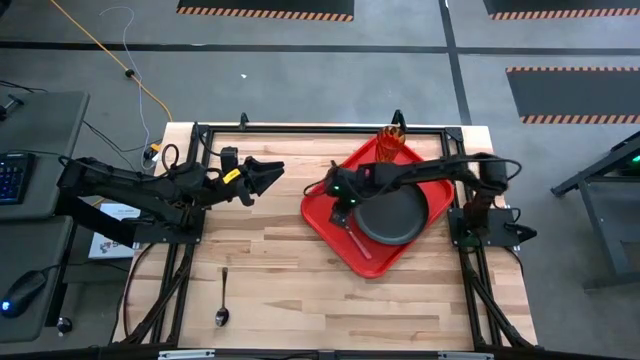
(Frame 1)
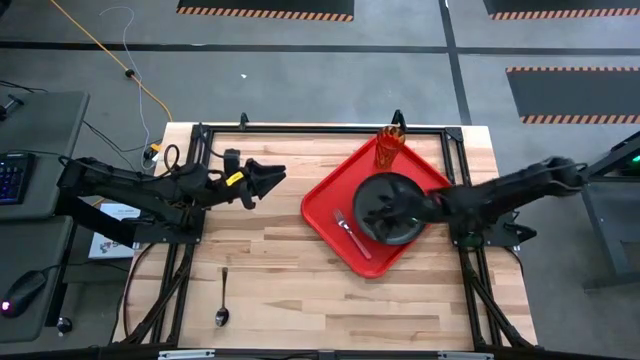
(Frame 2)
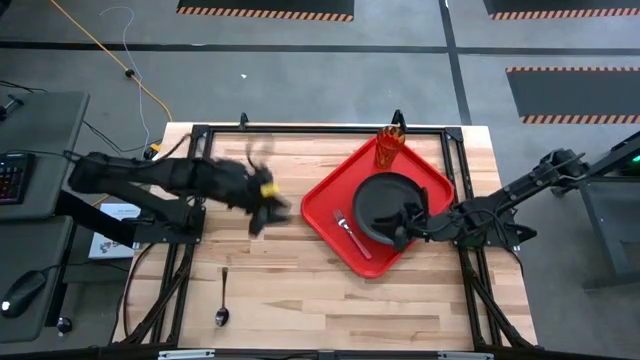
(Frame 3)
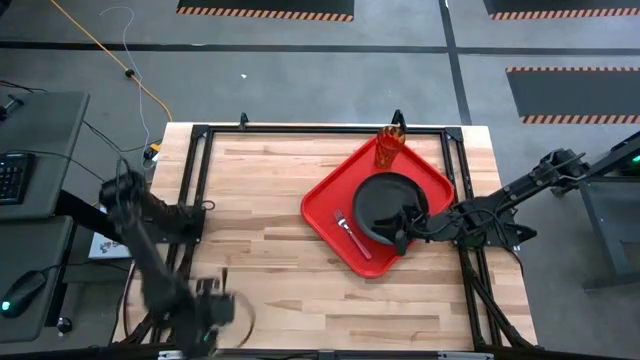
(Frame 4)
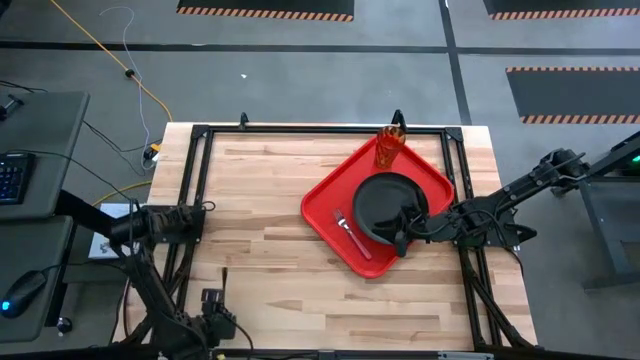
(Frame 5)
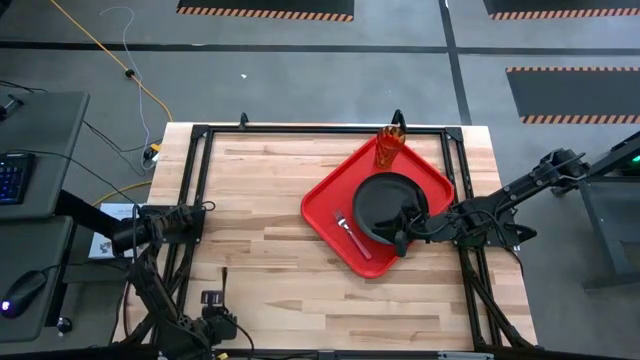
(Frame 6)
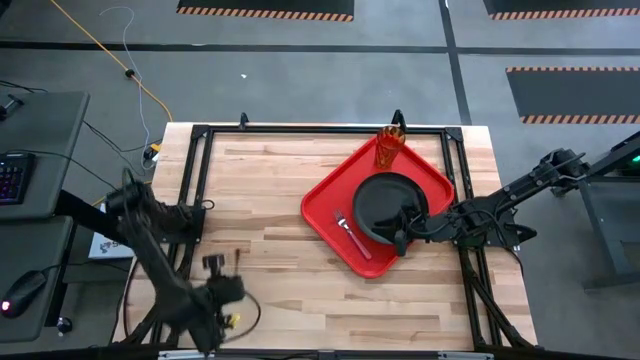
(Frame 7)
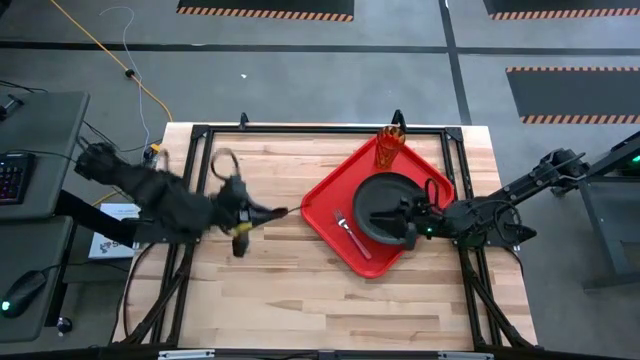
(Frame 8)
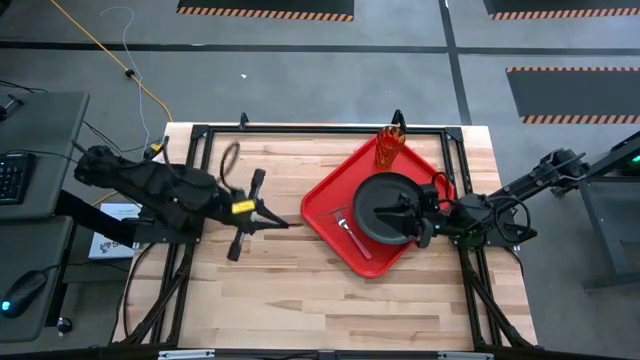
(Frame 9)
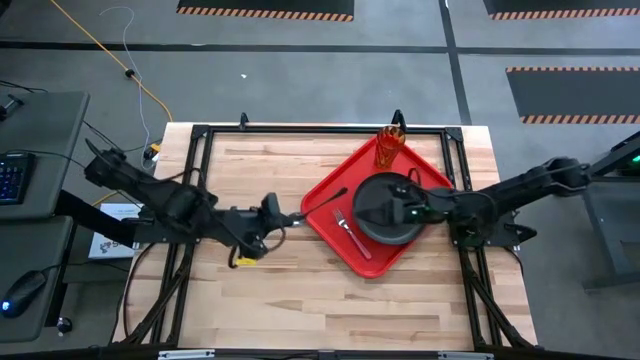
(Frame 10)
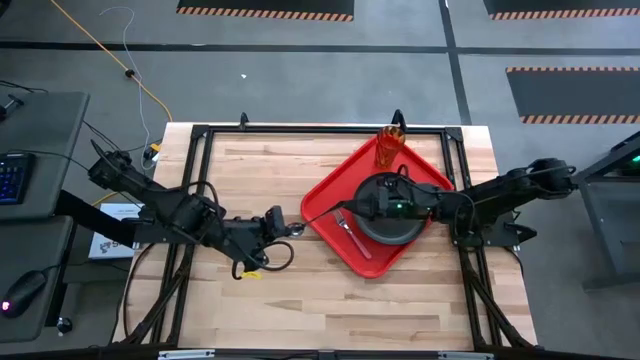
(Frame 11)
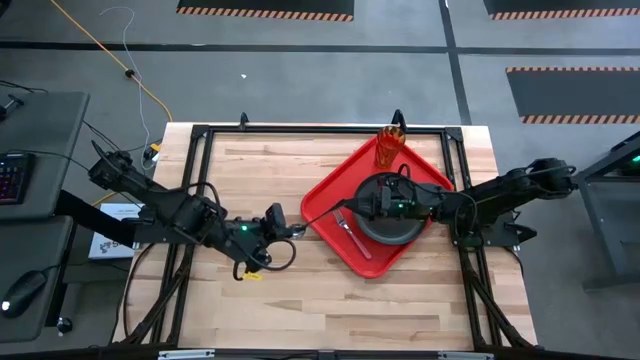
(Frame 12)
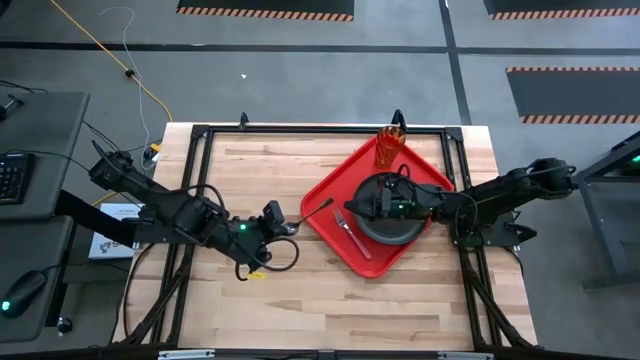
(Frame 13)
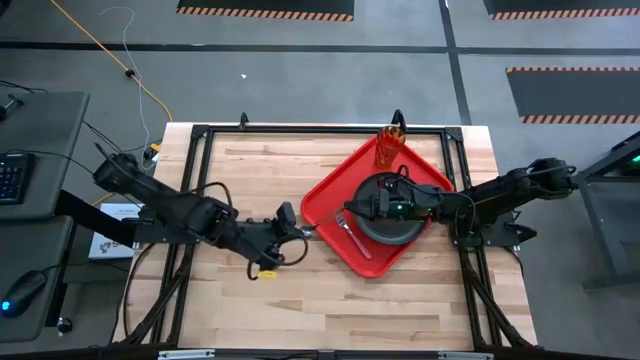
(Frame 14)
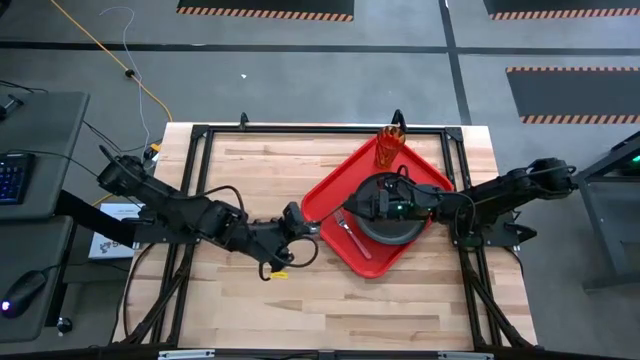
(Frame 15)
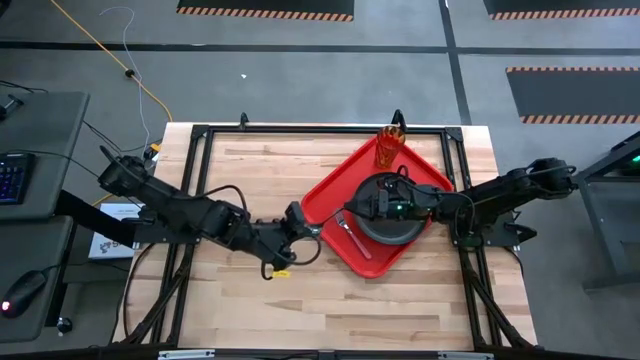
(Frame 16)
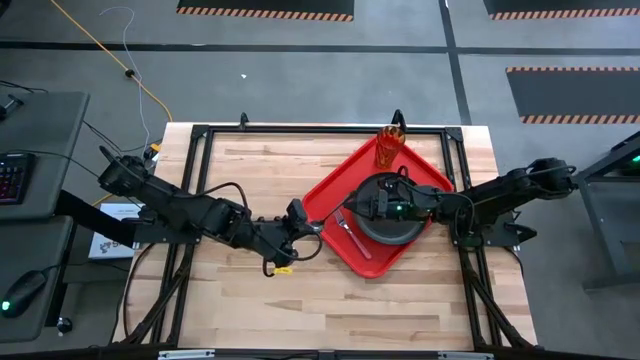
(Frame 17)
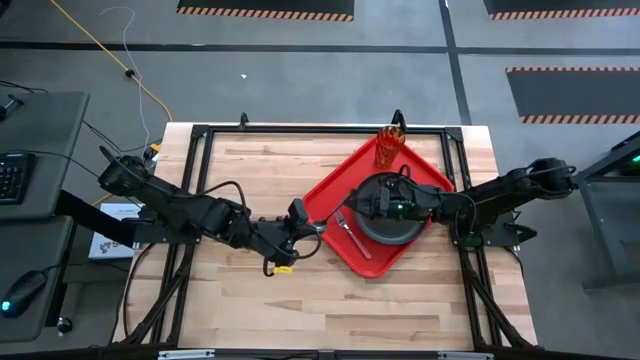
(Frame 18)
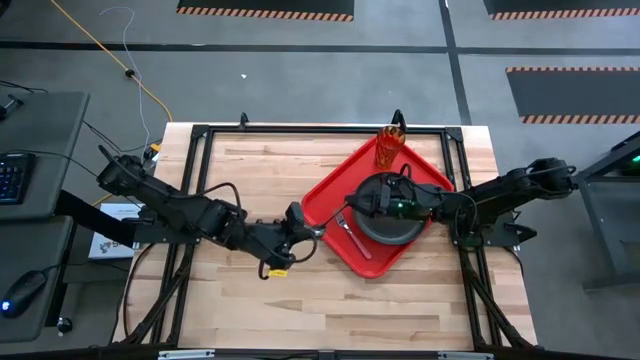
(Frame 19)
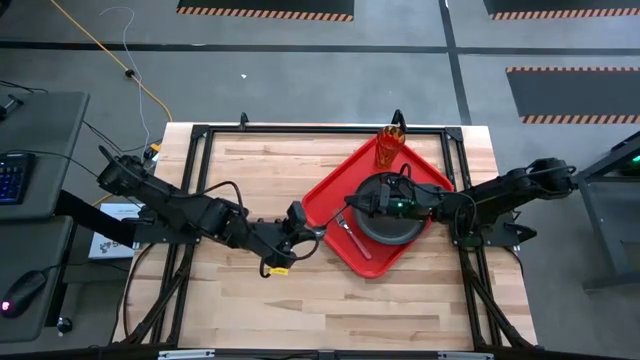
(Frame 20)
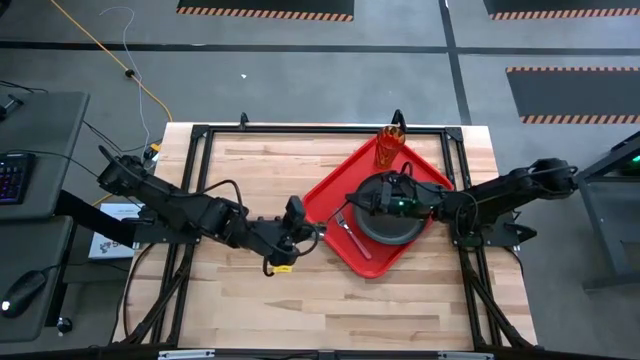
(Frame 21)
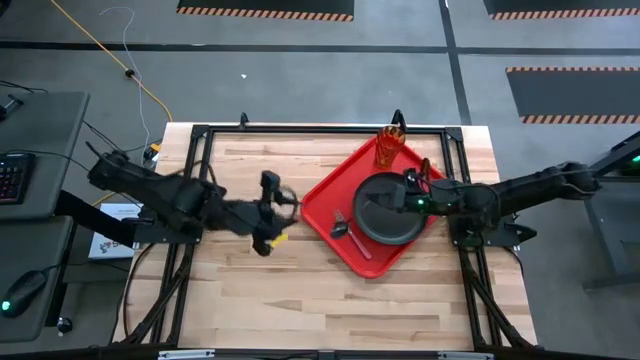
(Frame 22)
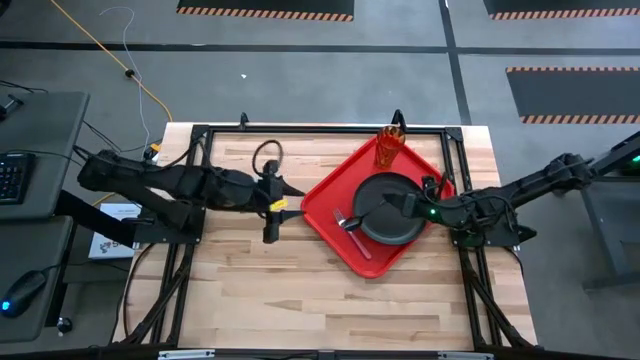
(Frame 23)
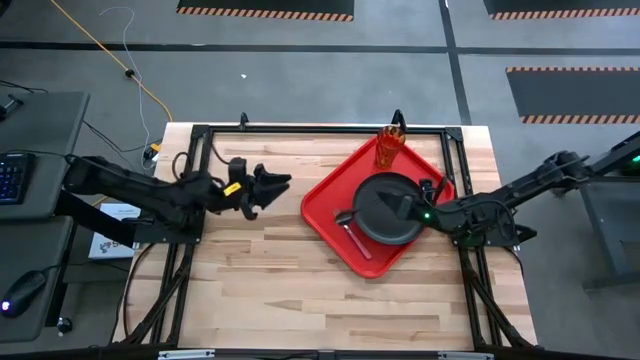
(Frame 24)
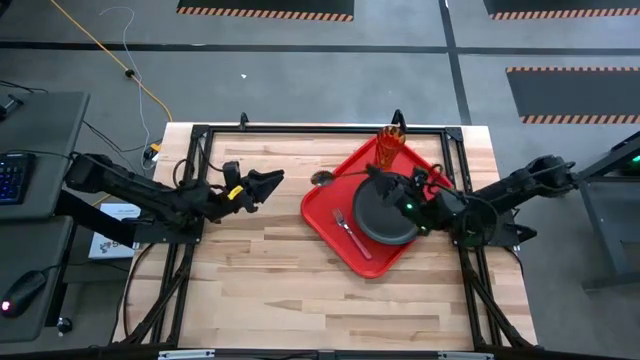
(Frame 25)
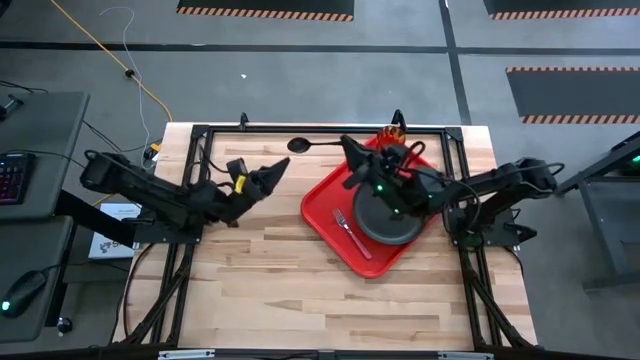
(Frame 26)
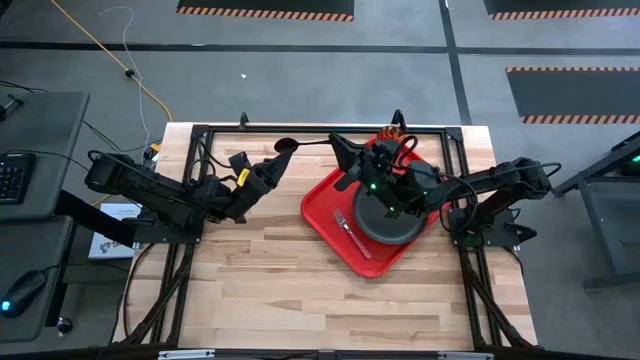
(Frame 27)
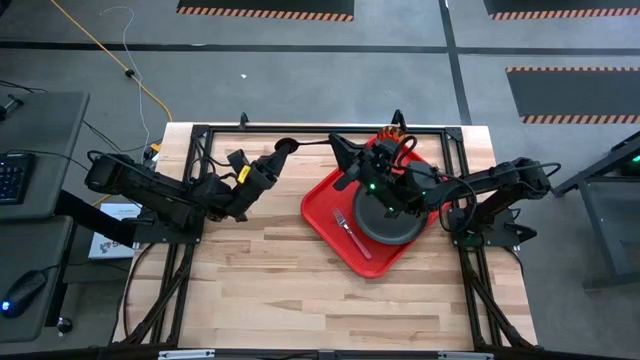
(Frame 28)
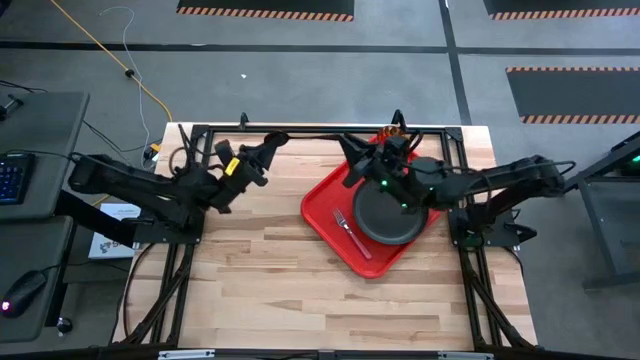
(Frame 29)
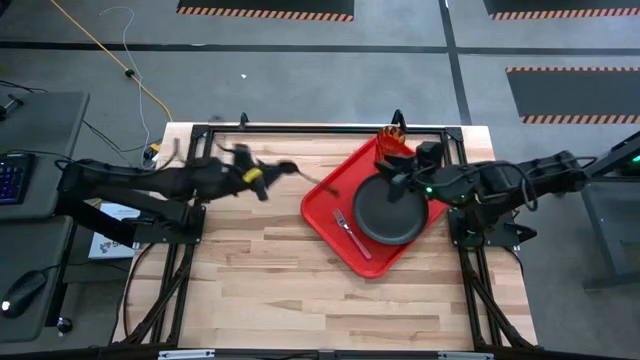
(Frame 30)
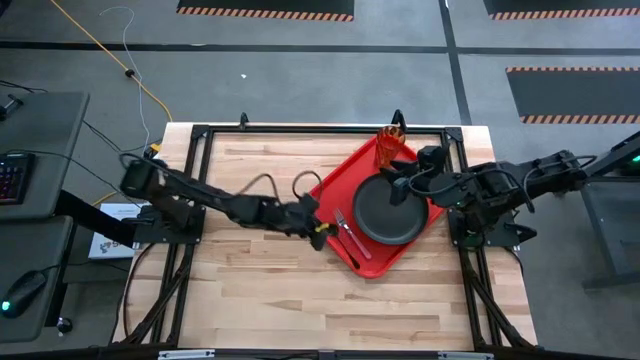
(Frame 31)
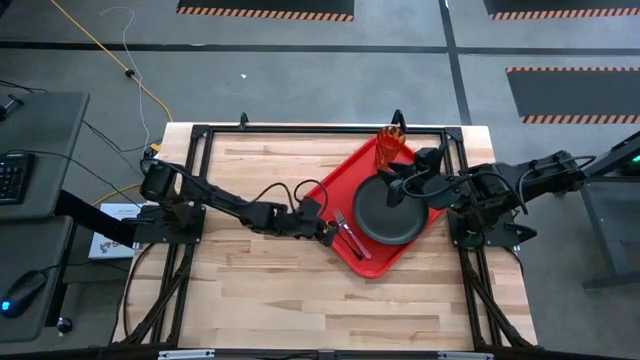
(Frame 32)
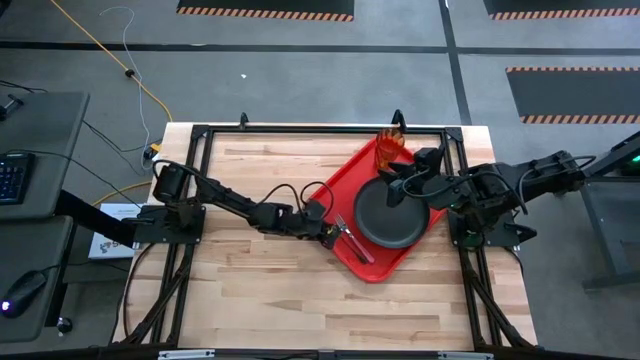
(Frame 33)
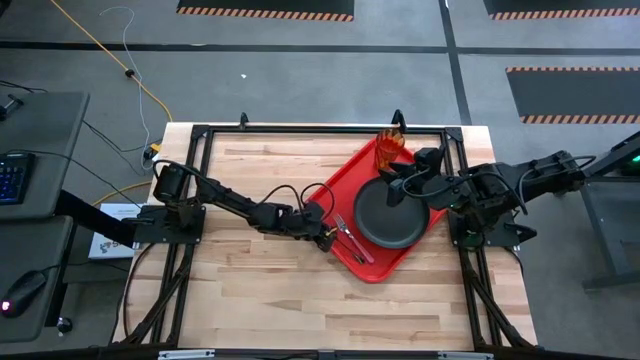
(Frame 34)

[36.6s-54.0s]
Task: Pick and place plate/cup/fork/spoon on tray
Put the black spoon on the red serving tray to the left of the pink fork

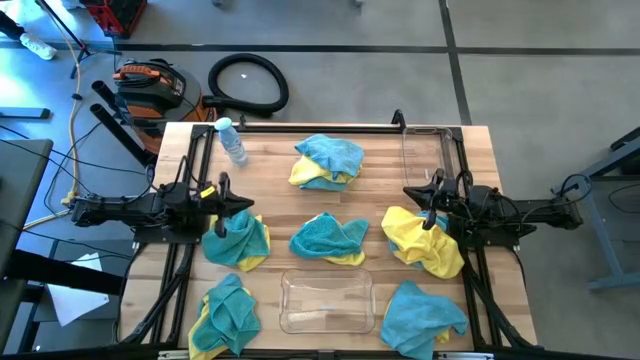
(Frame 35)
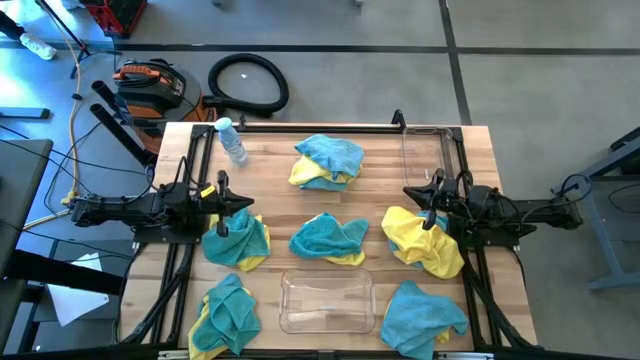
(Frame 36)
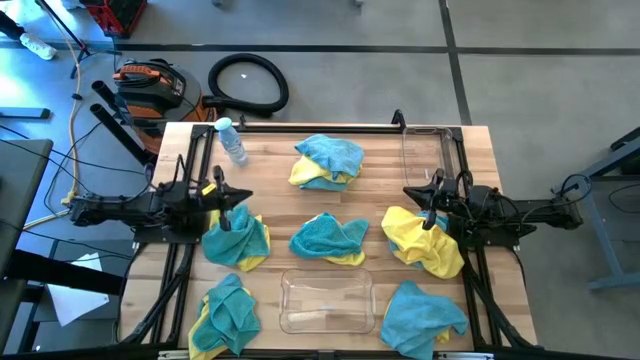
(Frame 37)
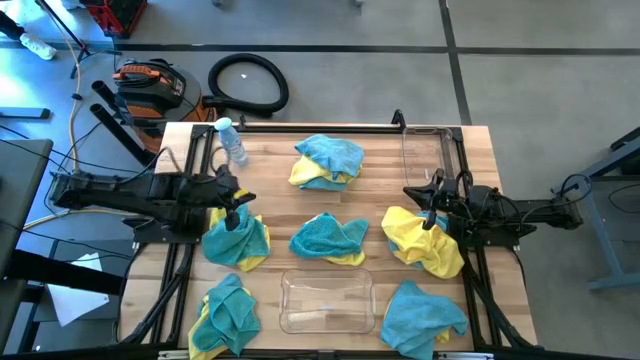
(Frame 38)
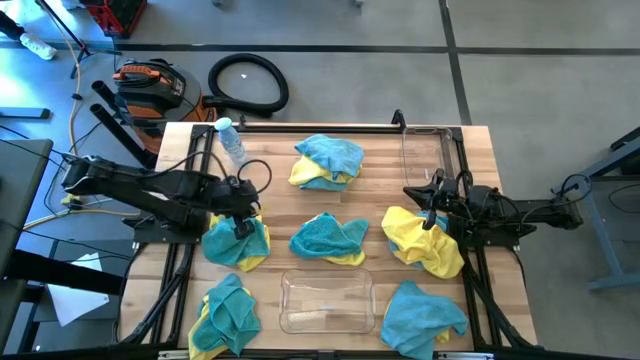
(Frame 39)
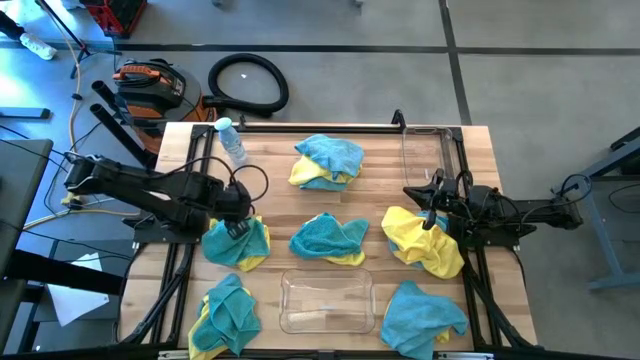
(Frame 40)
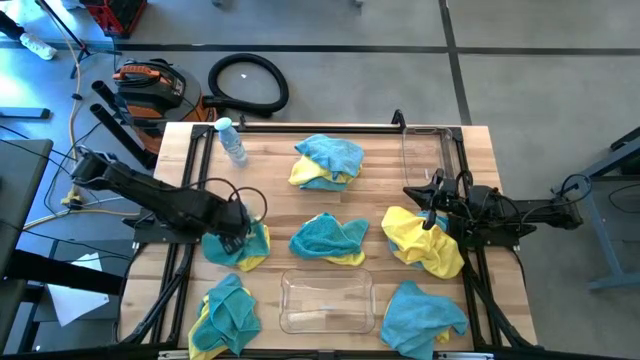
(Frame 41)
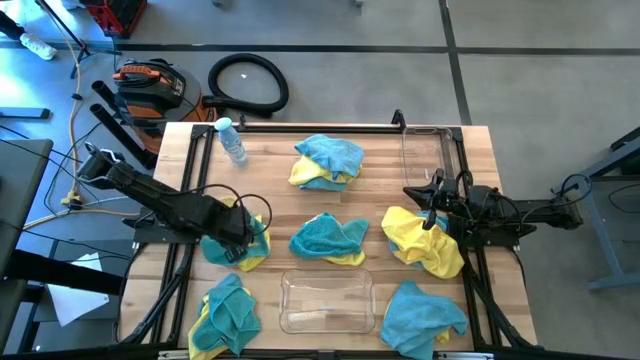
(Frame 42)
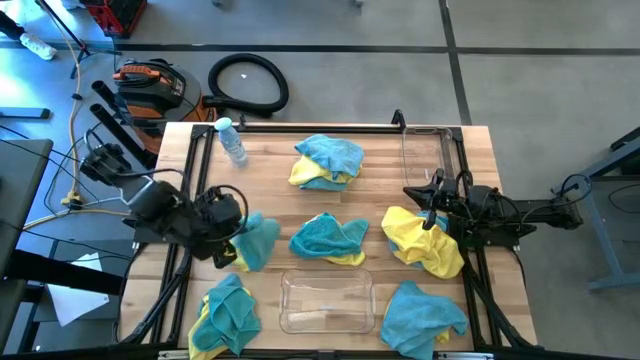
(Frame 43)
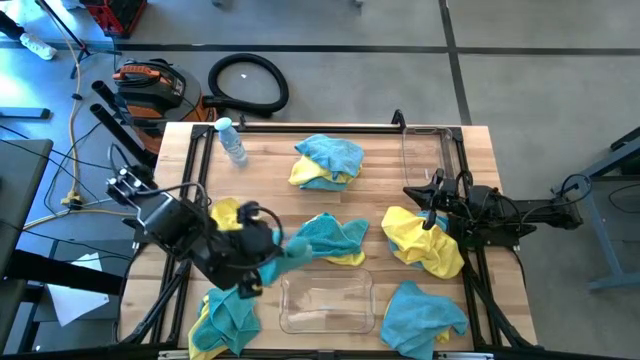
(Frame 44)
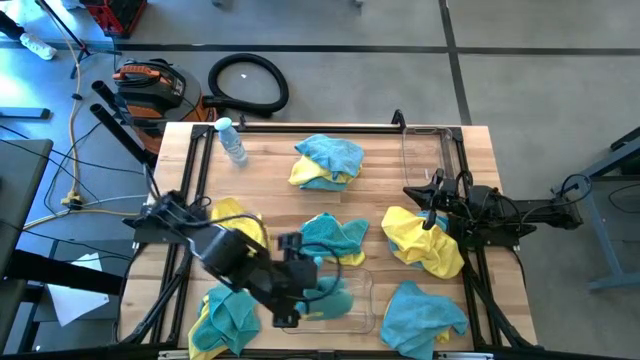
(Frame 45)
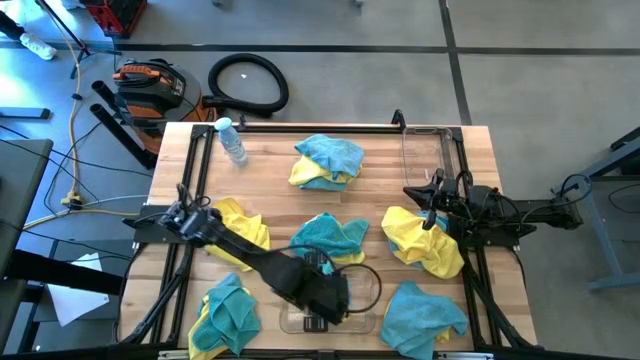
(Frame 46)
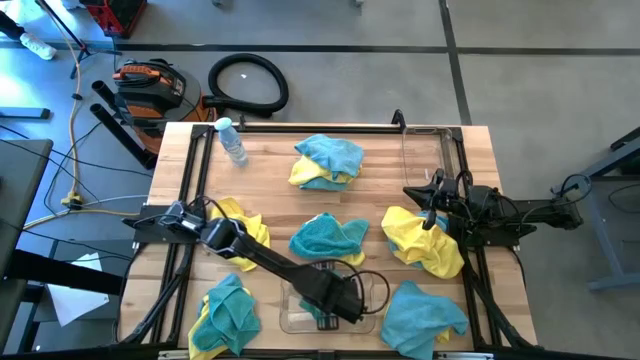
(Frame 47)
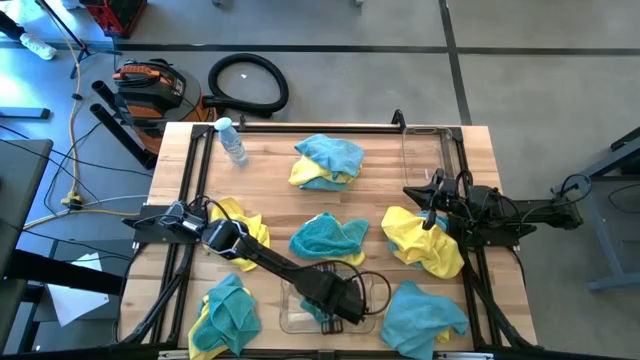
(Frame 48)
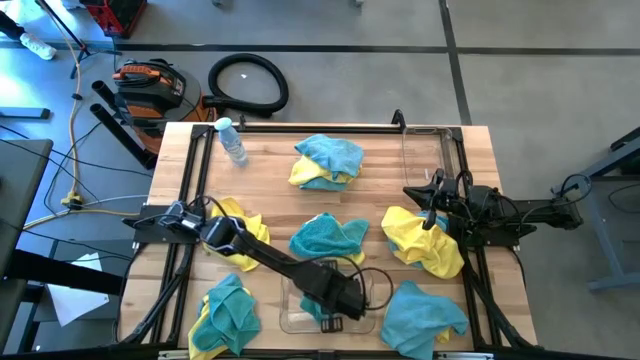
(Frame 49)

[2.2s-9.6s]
Task: Sort microfiber towel by color & place in baskets
Put the blue microfiber towel into the bottom transparent bin
